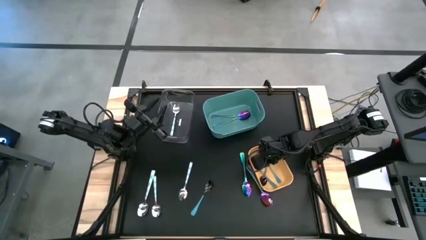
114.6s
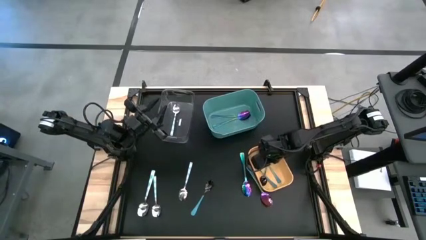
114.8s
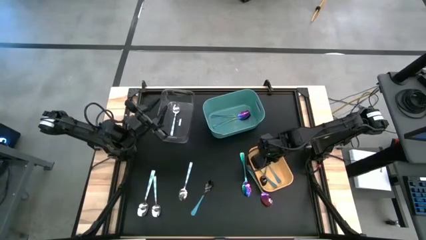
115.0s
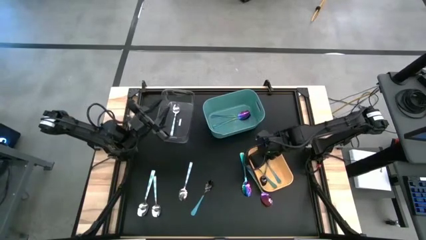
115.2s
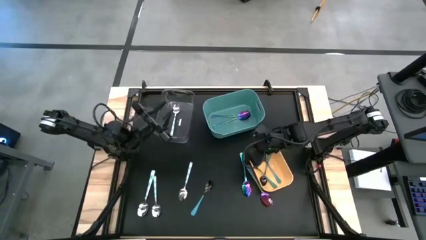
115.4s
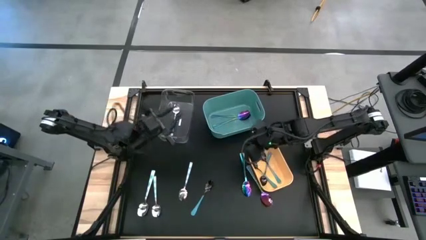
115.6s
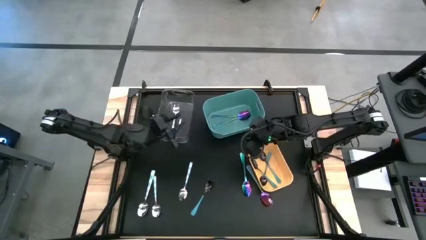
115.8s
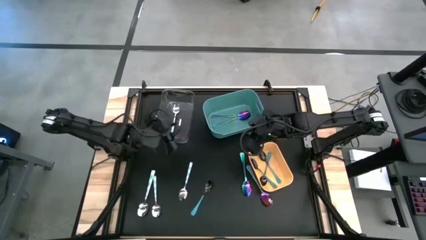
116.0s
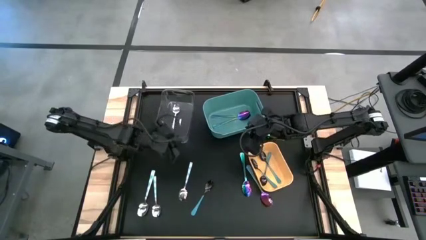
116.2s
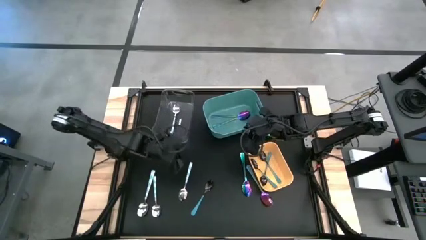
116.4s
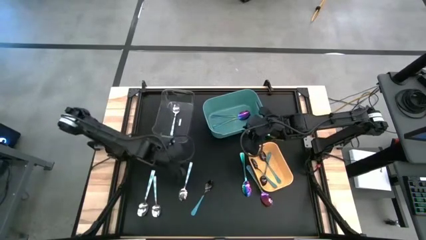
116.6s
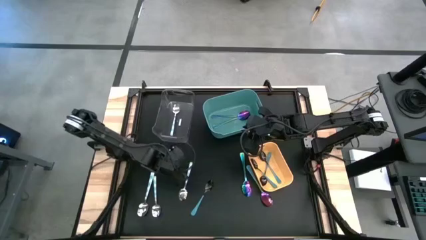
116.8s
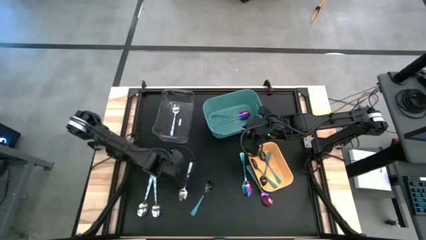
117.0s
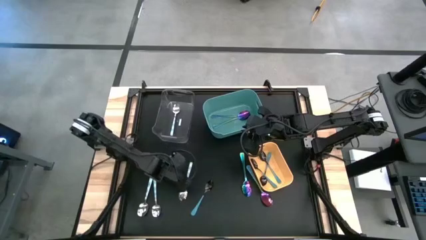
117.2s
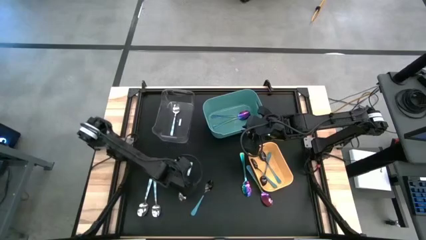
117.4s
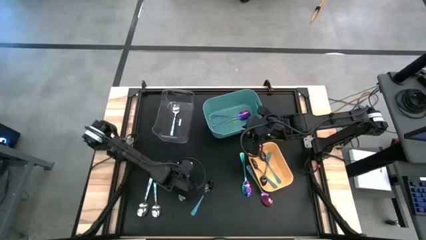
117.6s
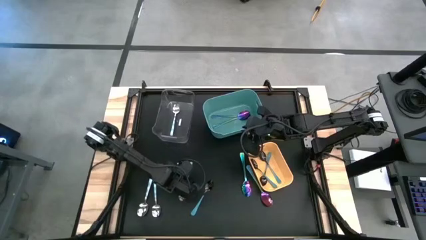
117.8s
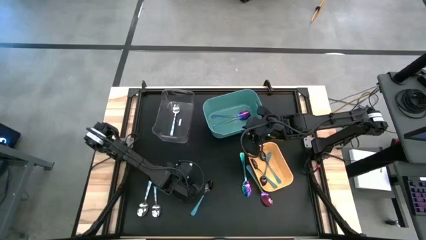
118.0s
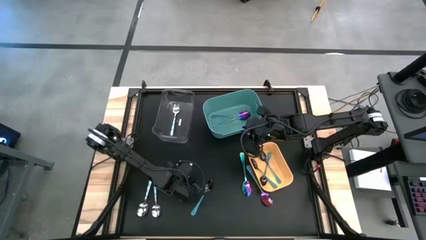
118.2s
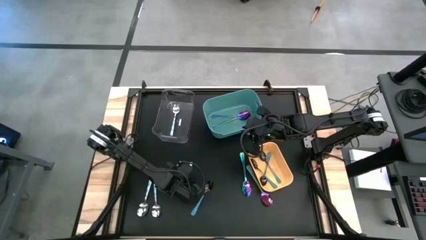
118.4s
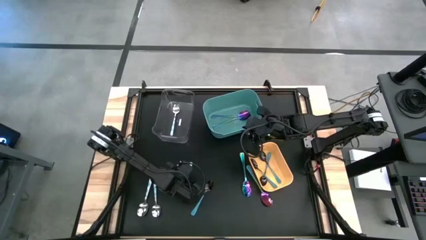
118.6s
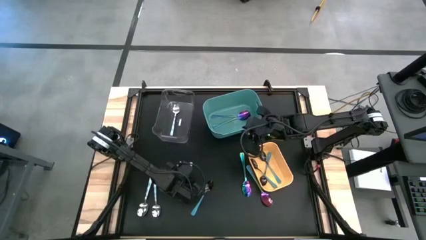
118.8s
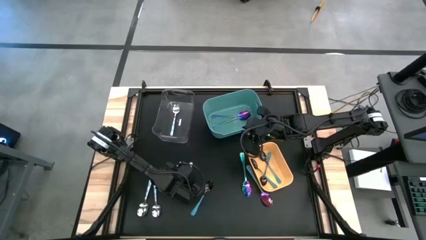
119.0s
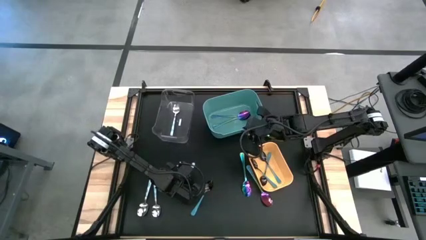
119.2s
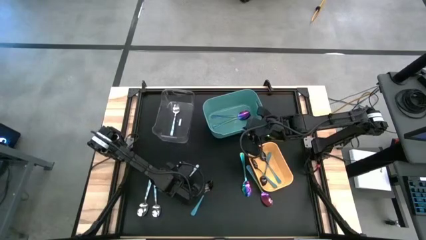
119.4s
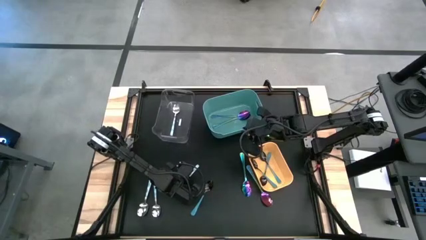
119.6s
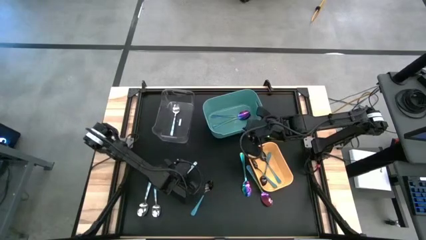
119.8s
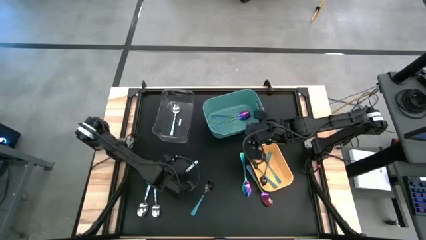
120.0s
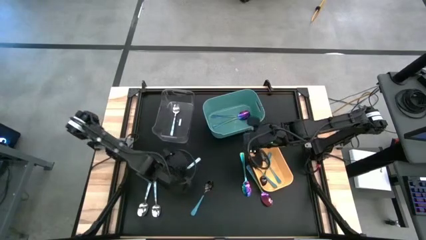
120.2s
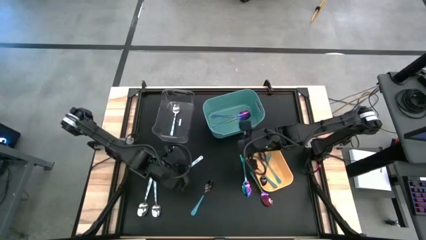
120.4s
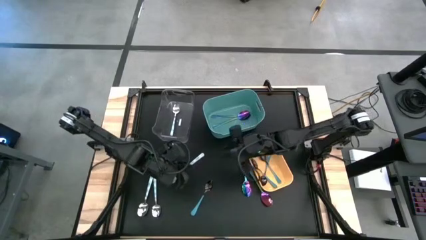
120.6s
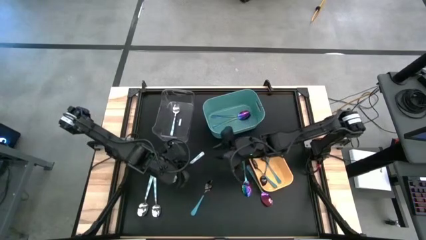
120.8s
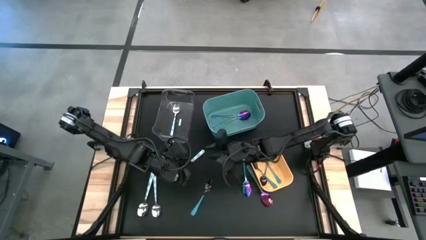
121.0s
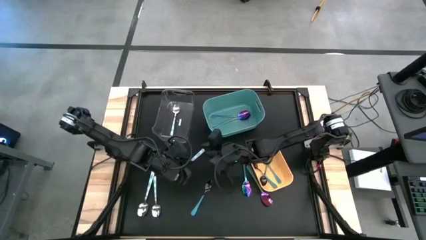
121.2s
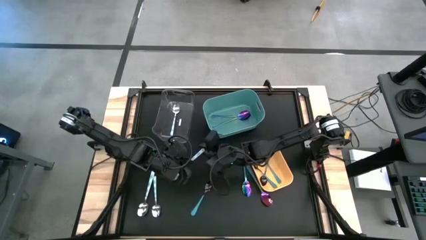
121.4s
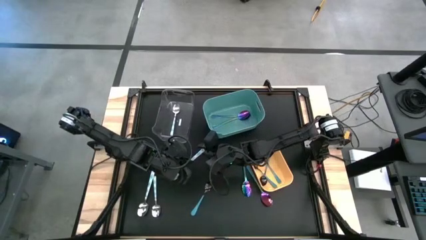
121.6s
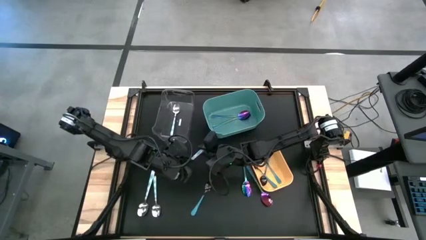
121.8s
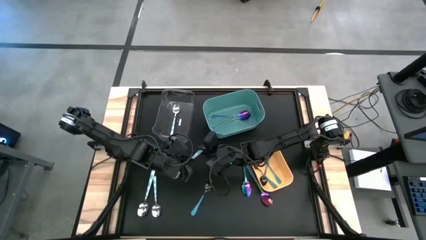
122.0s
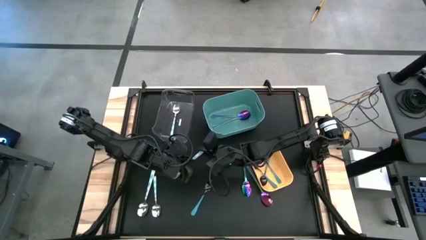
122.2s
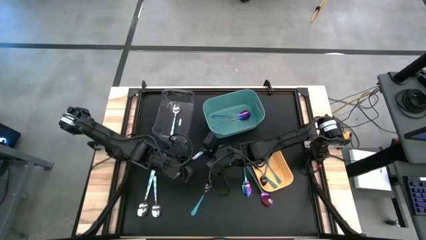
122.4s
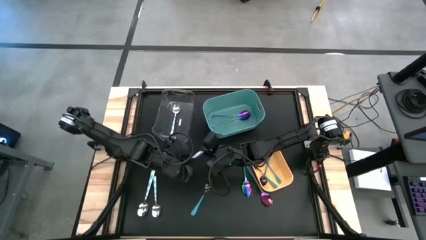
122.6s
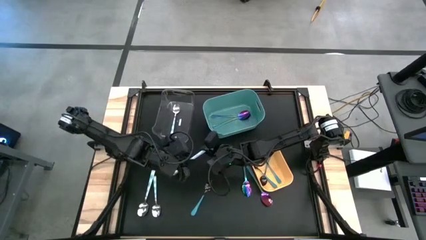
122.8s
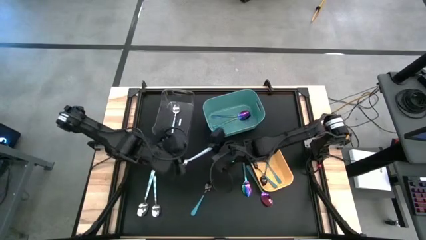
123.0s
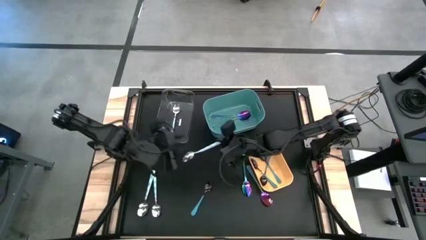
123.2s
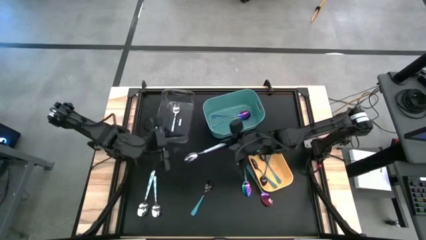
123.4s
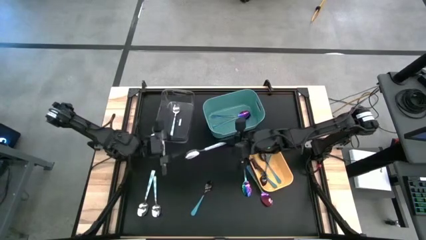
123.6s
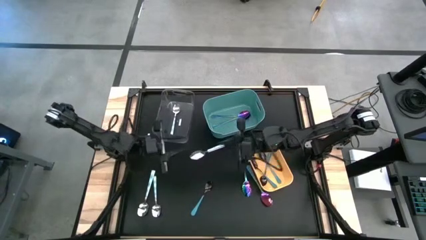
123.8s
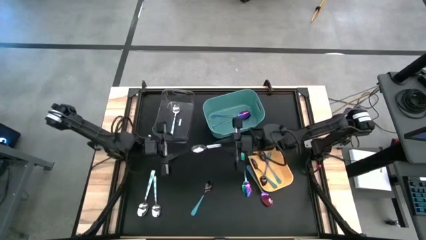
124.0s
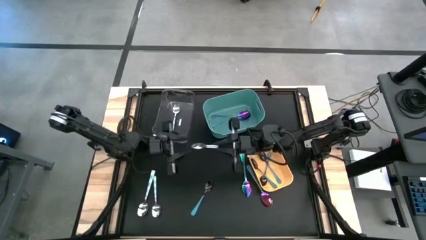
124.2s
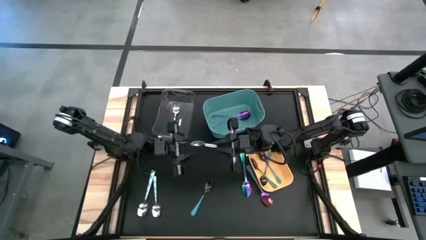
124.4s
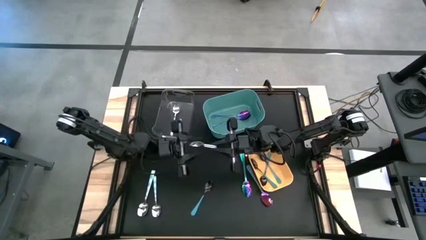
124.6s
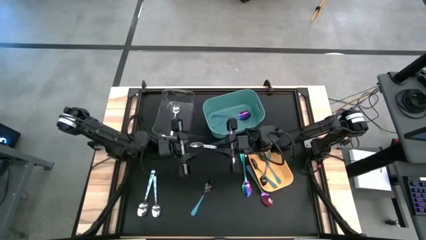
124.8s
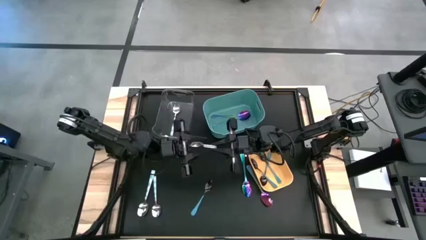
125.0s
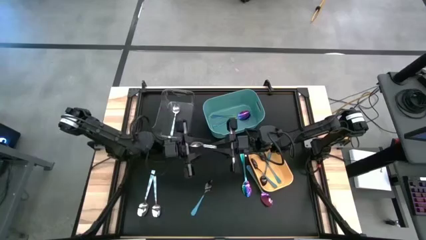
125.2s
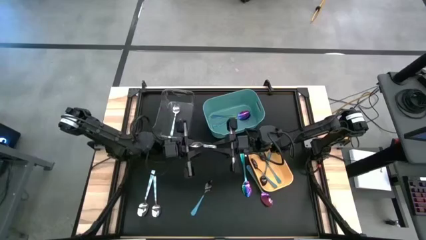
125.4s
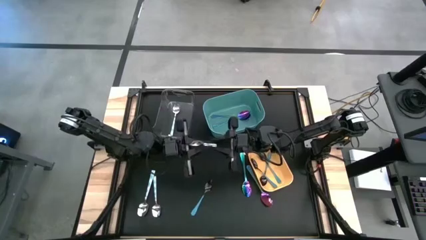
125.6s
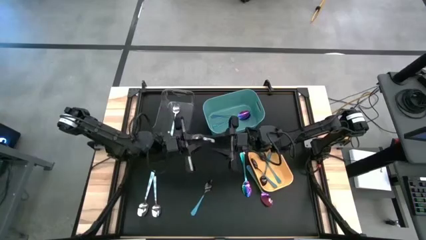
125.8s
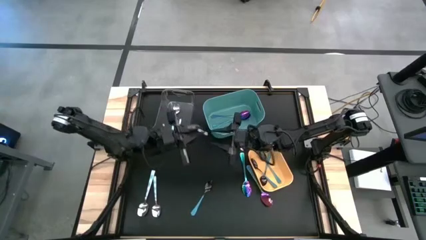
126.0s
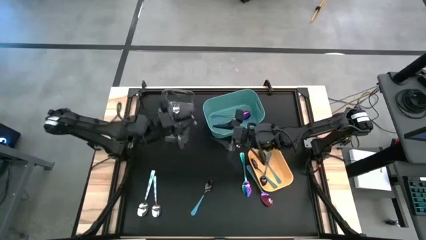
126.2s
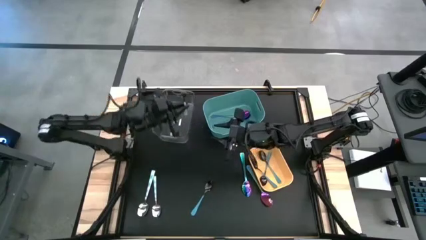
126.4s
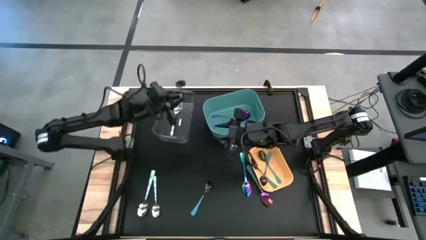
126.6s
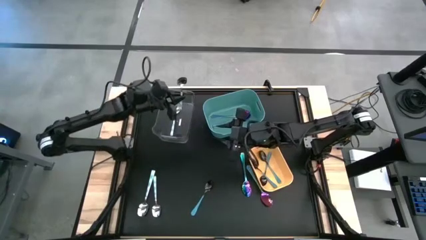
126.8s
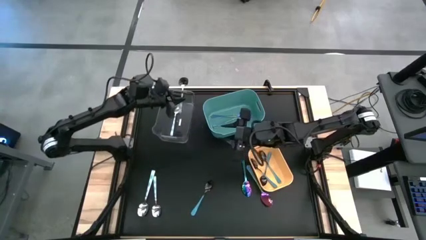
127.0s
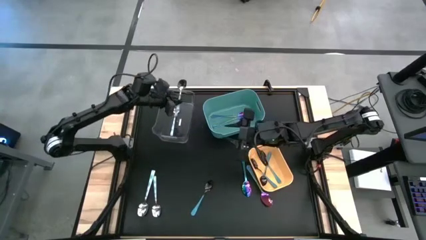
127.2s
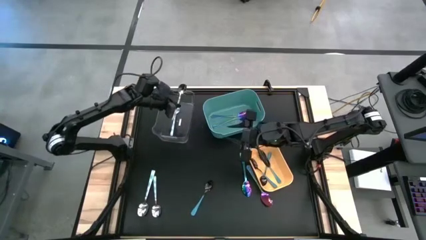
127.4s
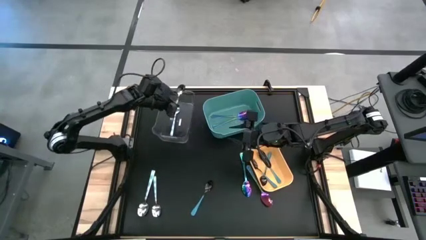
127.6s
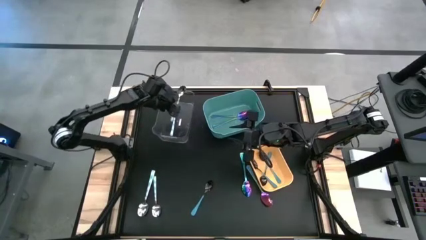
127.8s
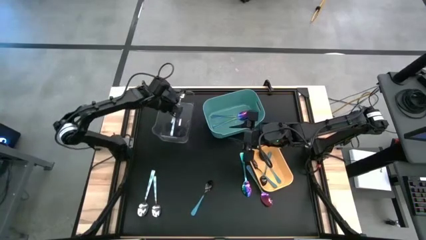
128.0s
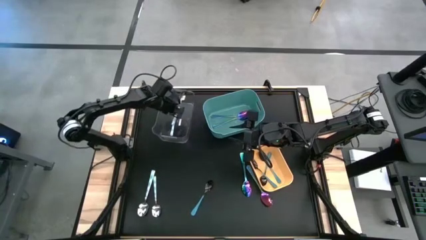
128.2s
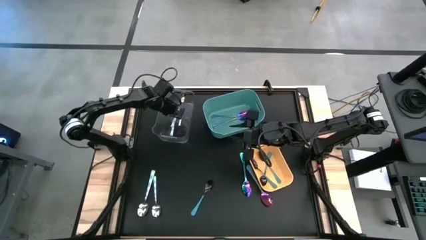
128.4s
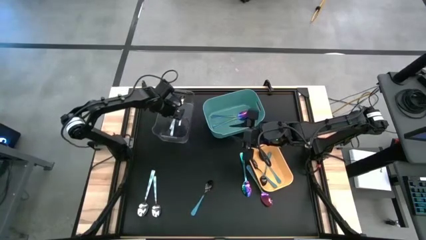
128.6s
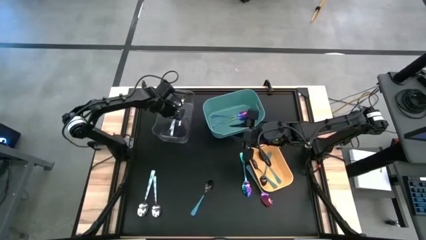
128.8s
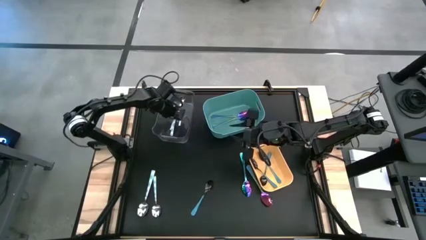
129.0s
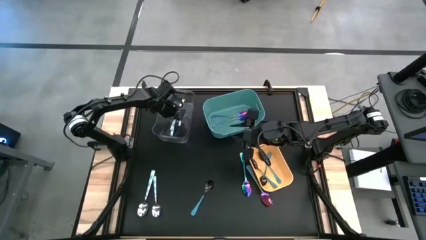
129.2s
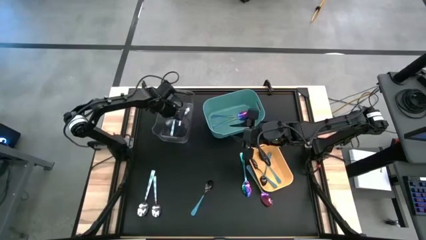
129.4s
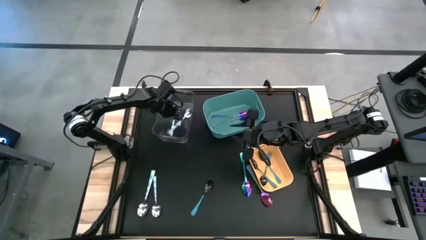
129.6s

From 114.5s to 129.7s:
Task: Sort silverware by color (type)
Put the patterned blue spoon into the transparent bin

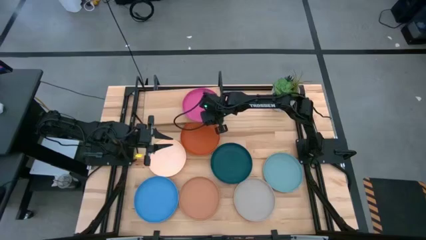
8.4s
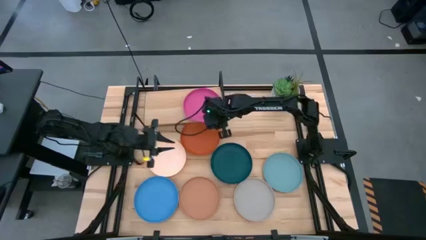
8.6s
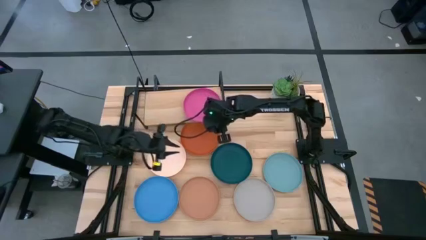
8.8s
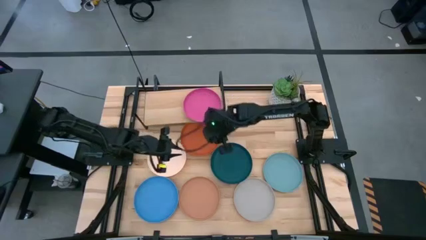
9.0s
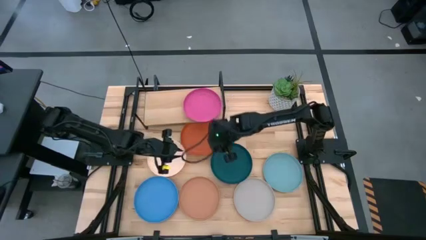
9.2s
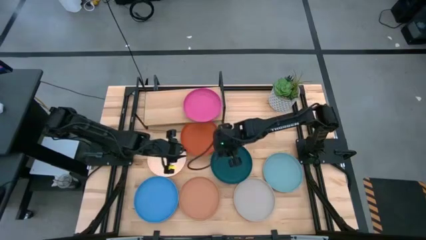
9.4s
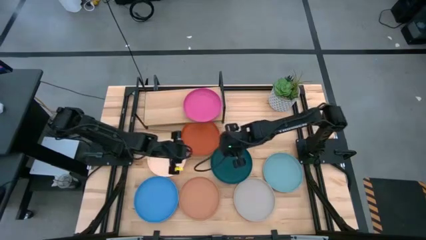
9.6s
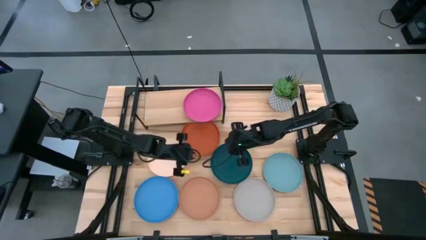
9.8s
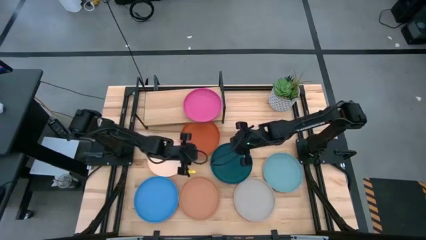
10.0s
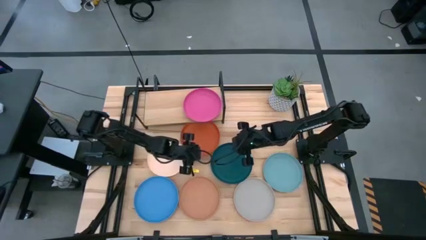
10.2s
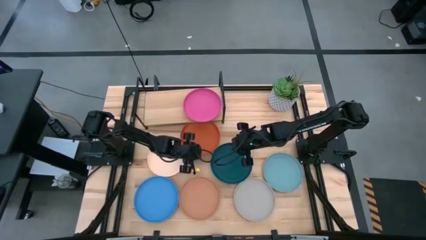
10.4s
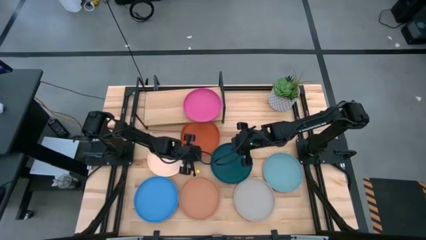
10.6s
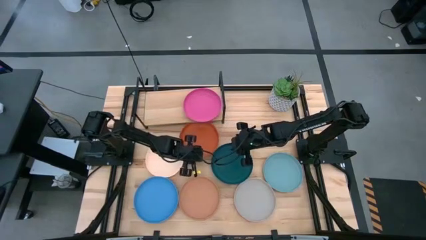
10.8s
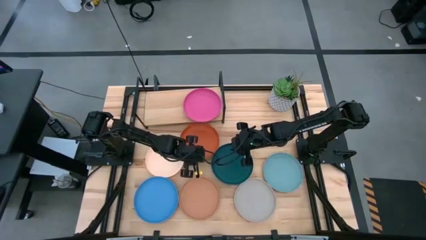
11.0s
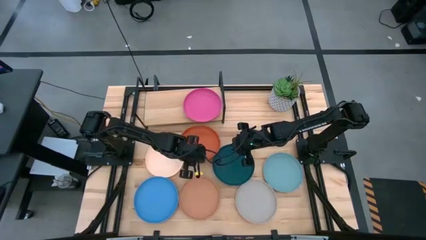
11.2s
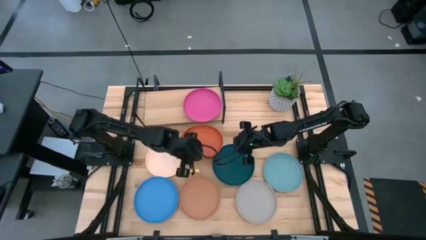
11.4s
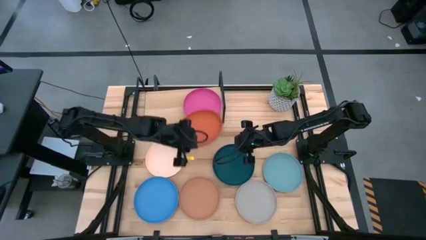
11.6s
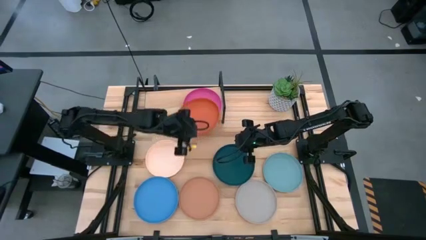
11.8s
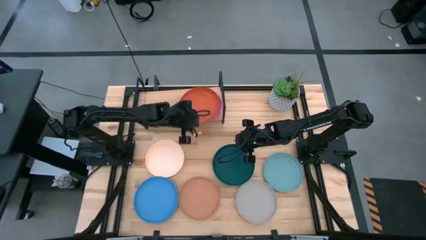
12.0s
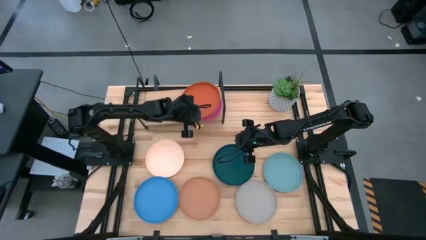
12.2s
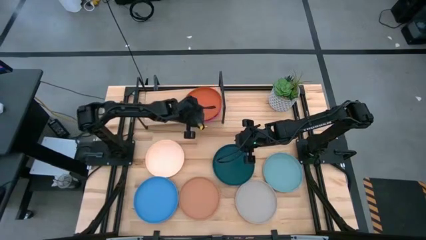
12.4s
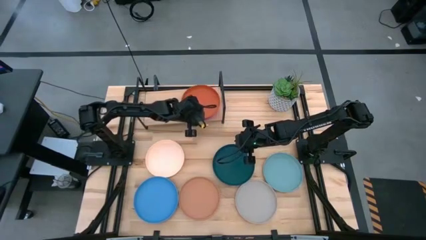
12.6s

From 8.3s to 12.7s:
Task: Place and stack plates onto a shelf
Stack the orange plate on top of the pink plate on the shelf
